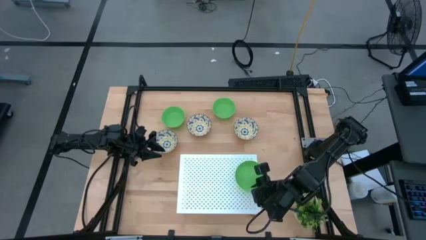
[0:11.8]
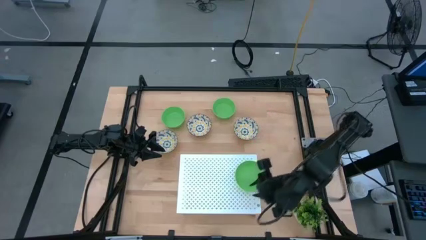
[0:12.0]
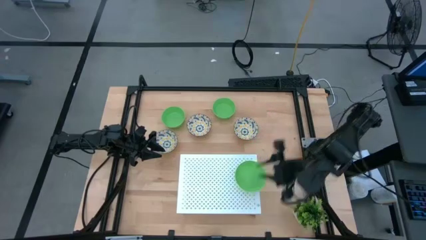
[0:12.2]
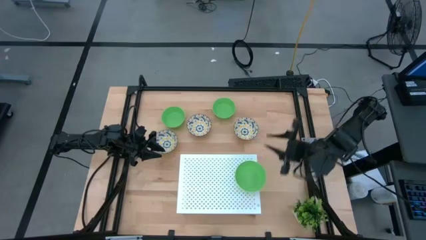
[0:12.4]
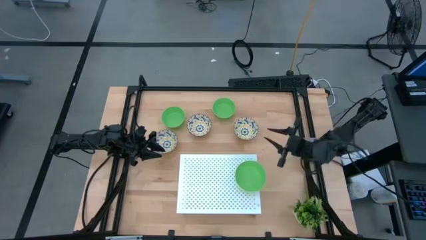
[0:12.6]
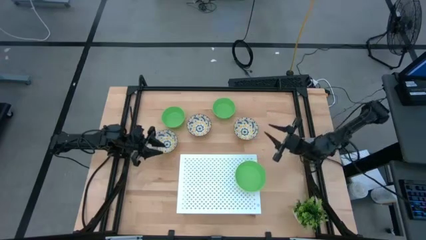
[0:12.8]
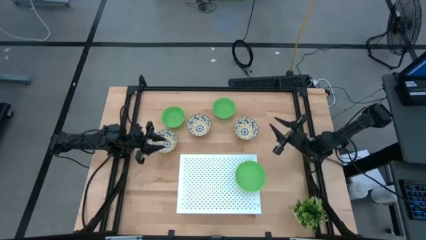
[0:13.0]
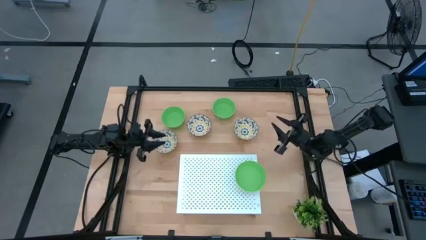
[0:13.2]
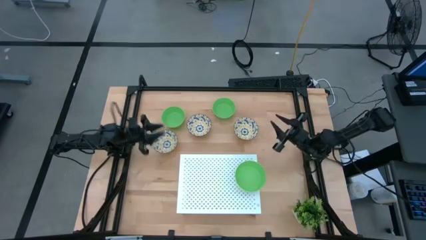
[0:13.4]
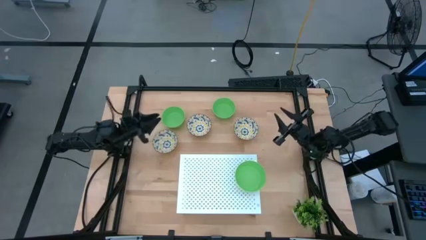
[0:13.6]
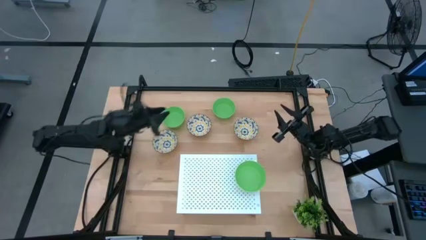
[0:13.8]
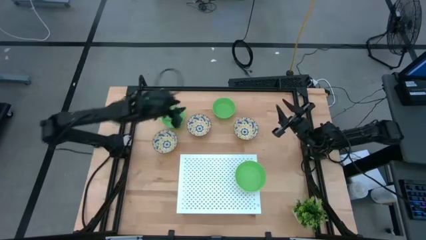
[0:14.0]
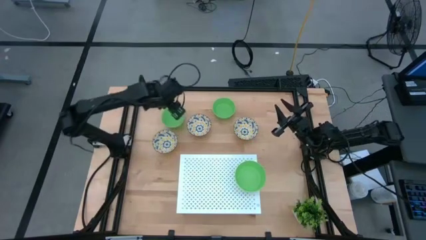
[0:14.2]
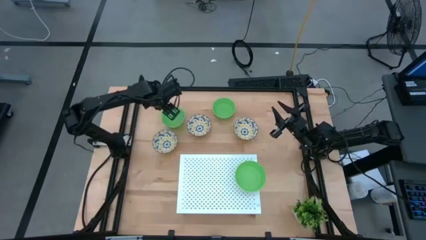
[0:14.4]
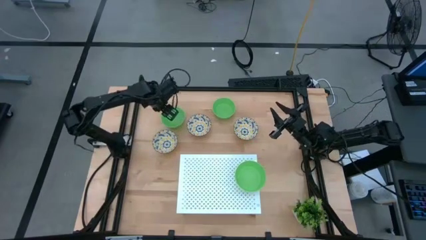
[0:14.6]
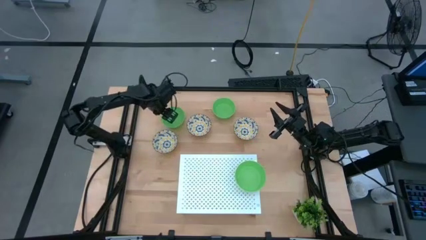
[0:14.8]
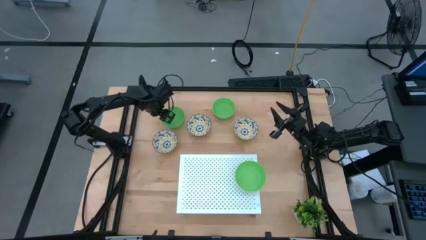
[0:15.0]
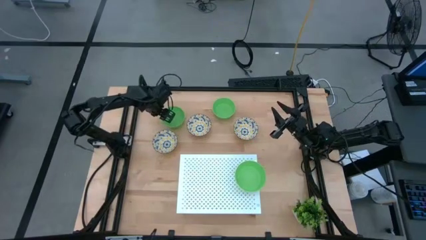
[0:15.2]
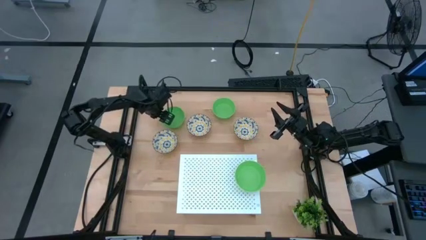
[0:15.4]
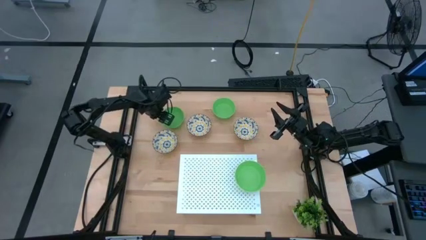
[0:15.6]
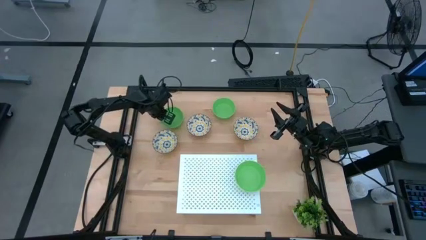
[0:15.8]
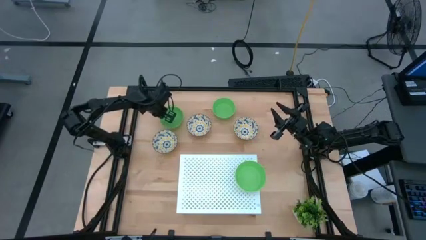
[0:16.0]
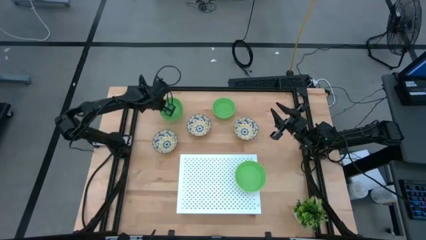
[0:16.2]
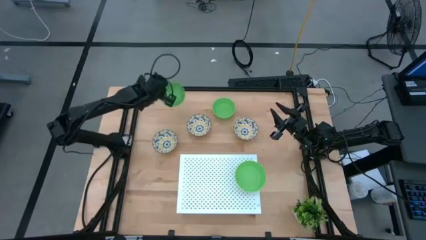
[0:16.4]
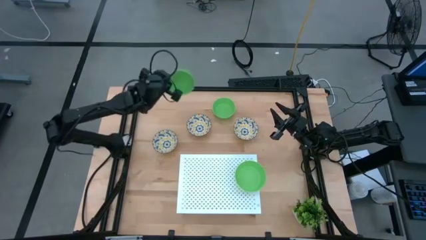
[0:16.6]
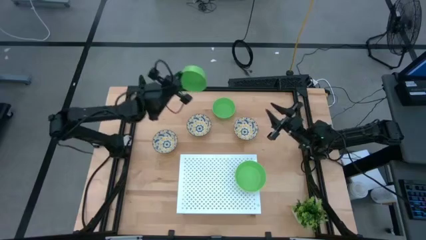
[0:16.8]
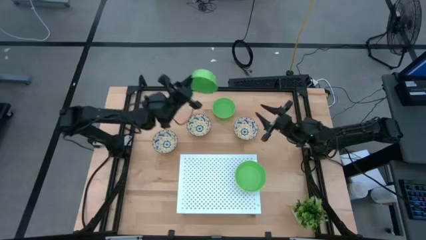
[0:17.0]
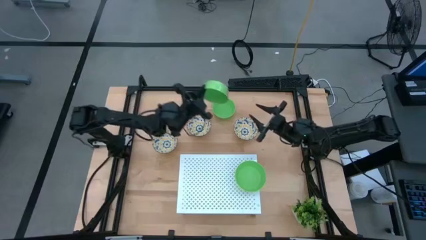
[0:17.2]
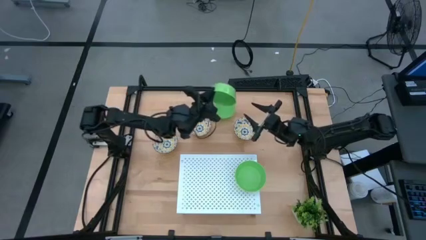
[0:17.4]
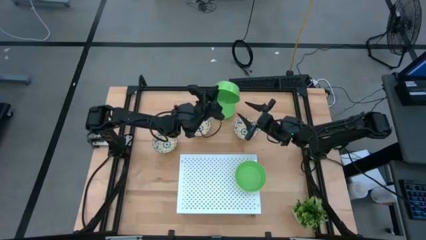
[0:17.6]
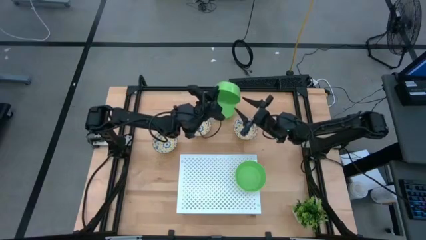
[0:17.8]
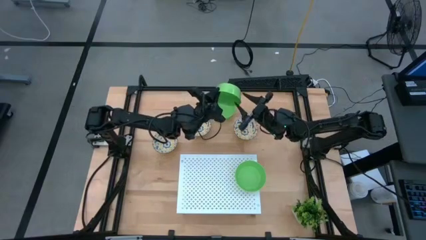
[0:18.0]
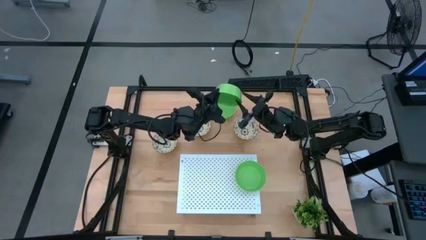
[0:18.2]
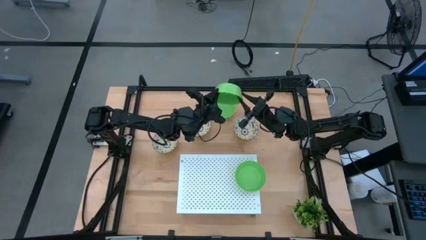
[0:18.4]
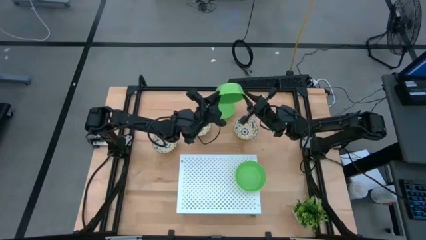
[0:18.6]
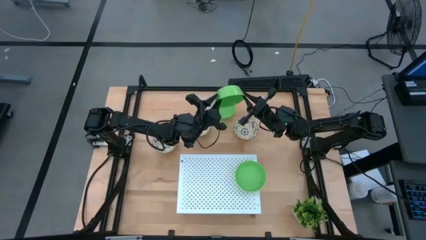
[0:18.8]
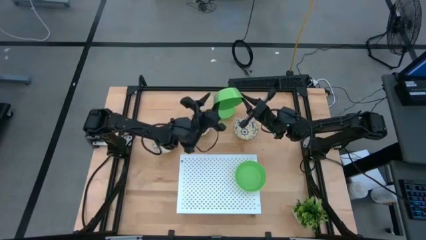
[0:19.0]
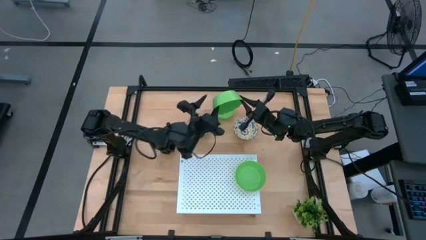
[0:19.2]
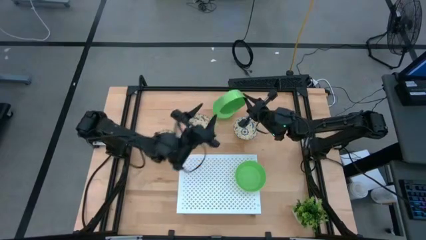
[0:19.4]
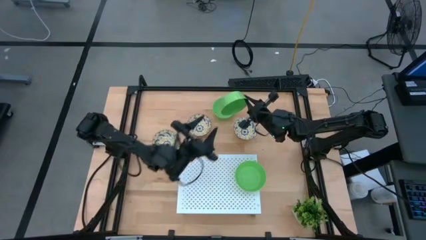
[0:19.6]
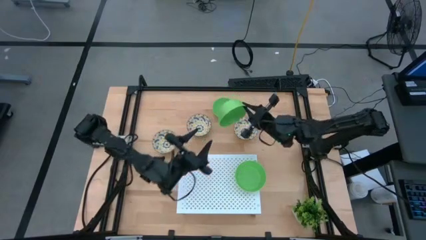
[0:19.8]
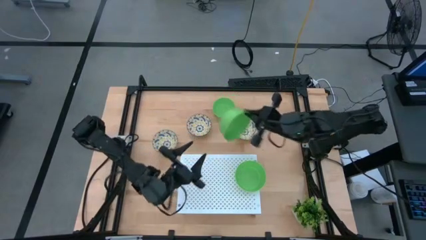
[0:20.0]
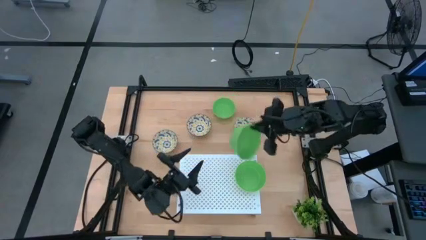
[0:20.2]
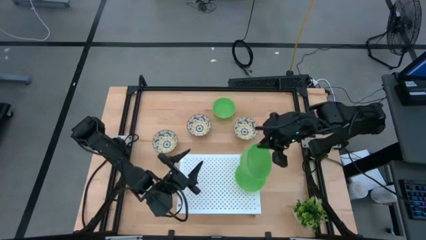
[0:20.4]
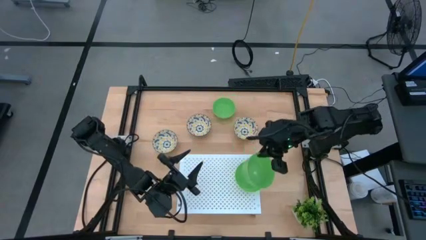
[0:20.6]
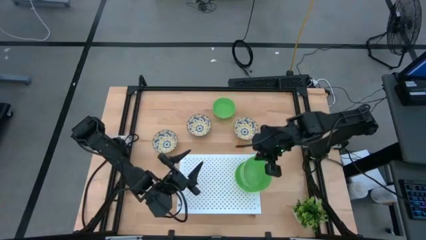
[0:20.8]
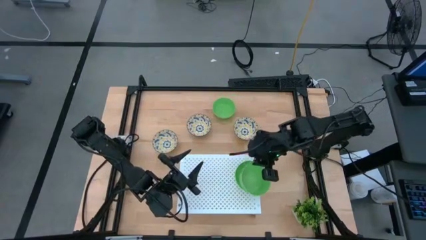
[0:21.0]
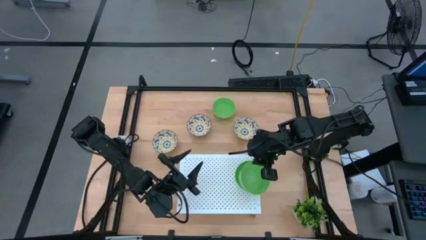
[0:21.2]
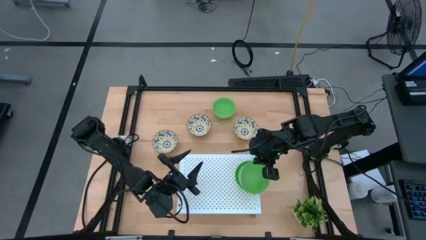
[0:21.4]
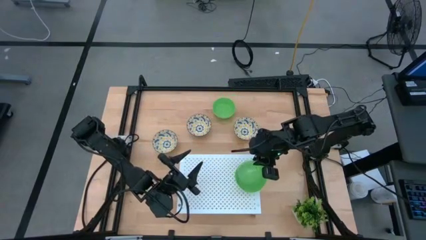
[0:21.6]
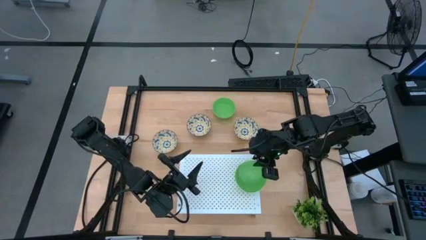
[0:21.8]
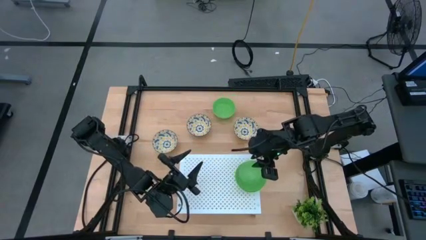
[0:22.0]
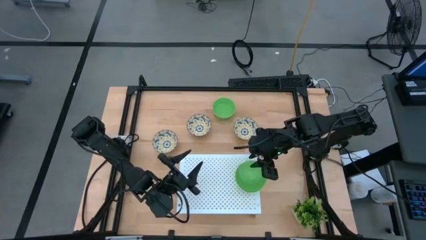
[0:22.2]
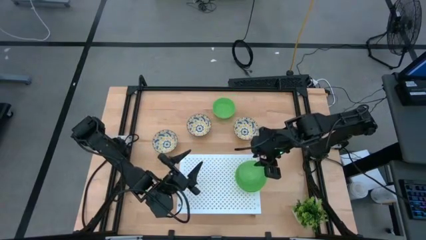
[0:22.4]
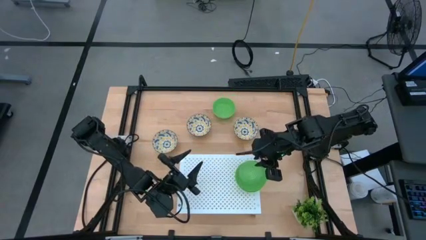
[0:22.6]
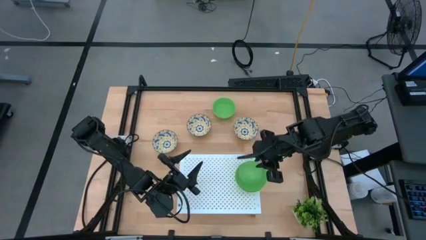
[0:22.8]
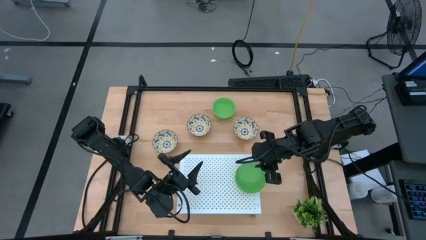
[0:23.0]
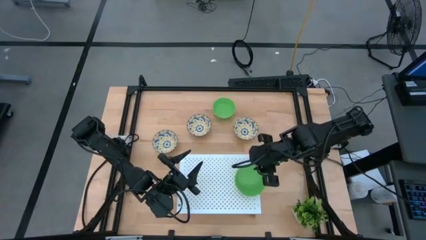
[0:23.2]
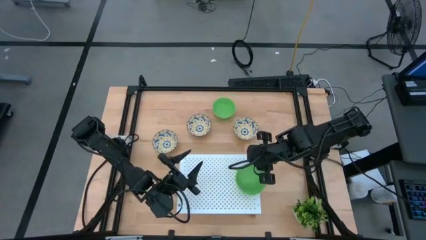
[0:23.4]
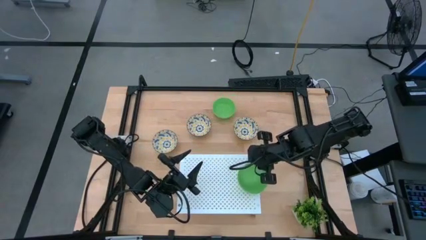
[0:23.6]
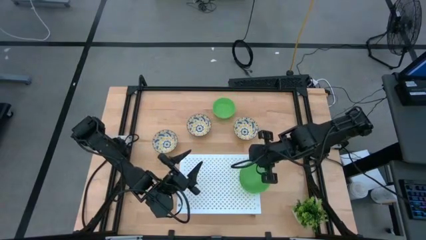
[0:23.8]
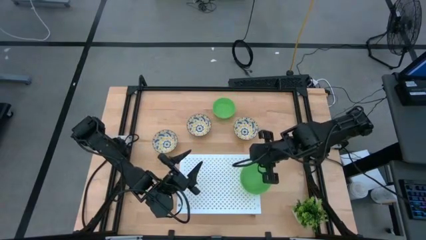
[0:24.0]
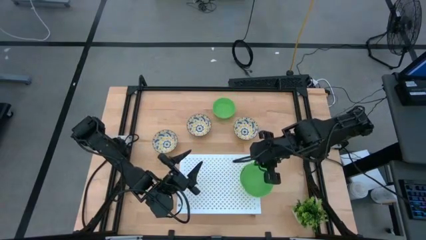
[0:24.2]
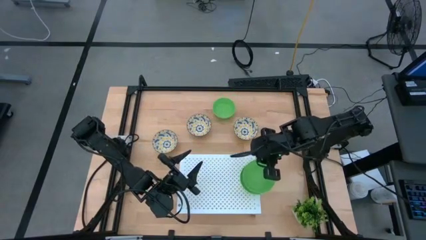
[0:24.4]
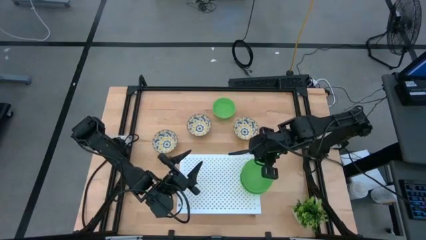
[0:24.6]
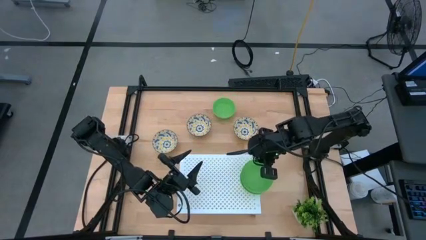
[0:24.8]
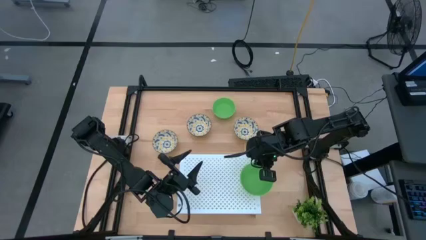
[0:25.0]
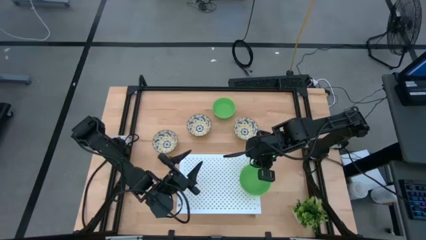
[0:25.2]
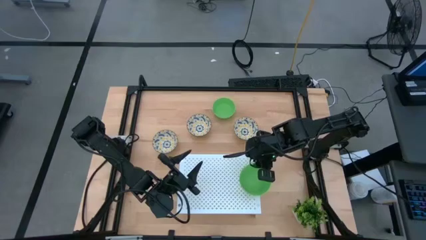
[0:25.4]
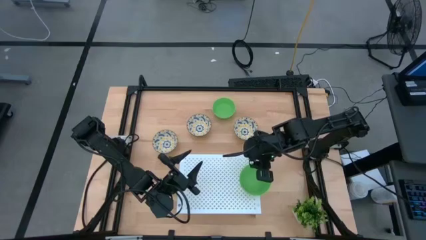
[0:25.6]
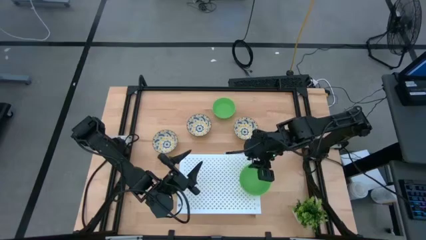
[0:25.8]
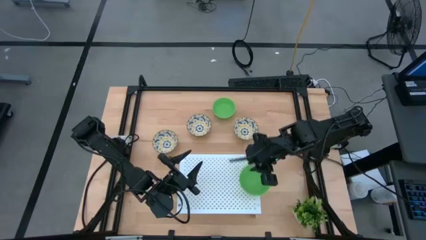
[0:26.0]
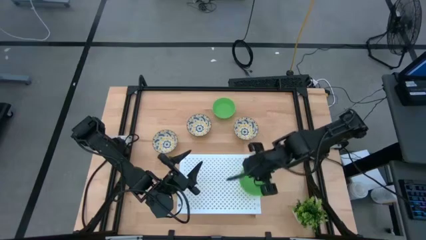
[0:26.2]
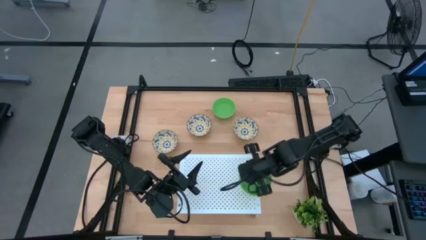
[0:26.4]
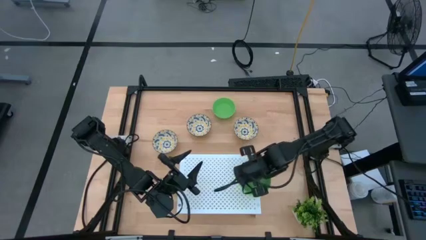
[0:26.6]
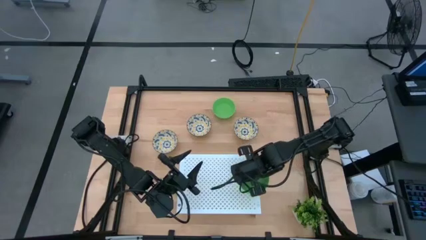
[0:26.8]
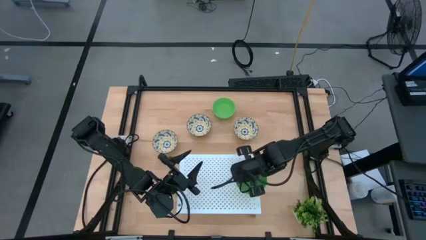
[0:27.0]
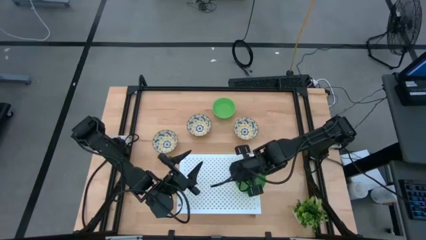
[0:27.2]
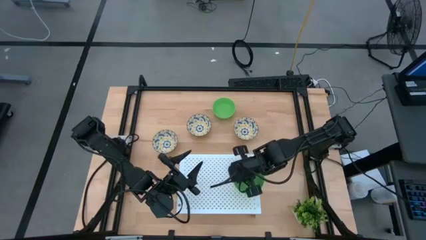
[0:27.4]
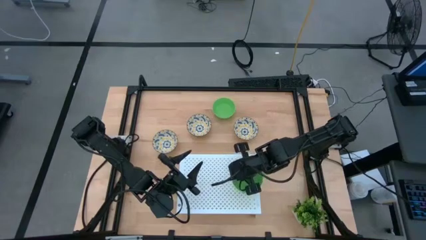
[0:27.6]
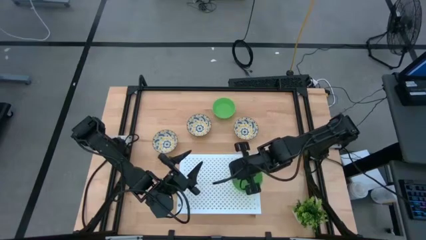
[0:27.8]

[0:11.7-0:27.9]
Task: Pick & Place Mini bowls
Stack the left green bowl on top of the green bowl on the shelf
